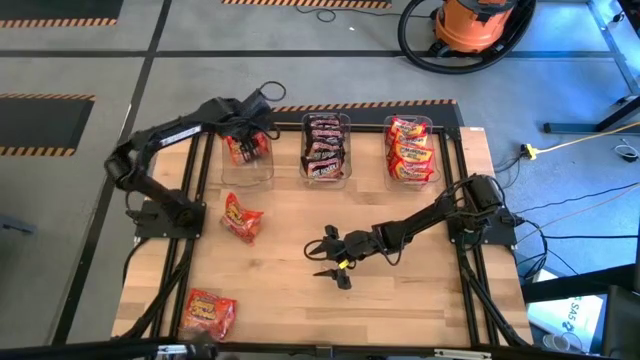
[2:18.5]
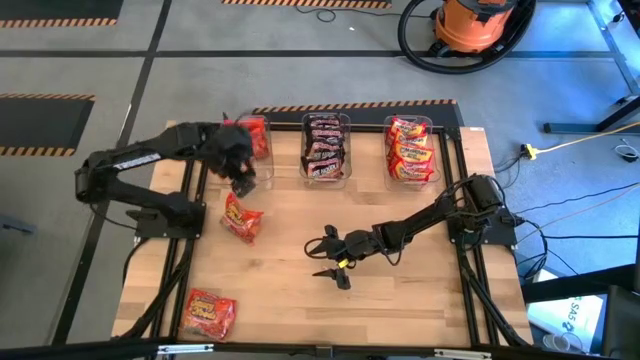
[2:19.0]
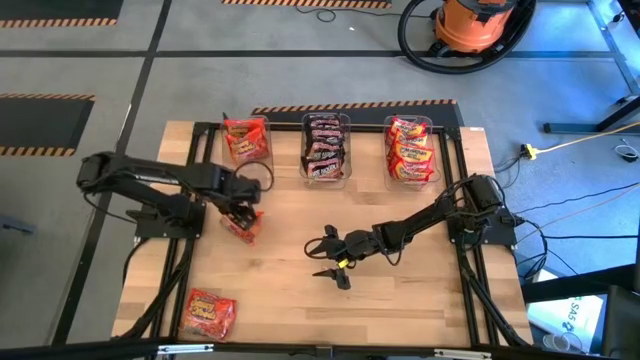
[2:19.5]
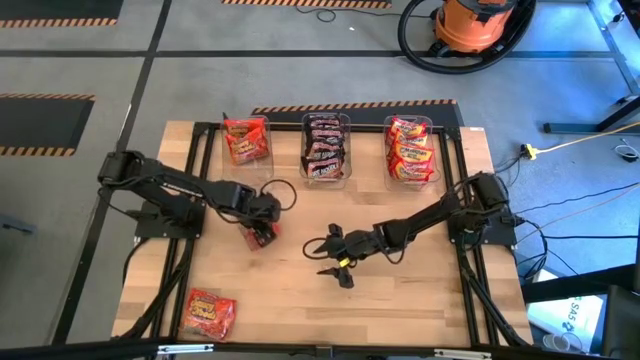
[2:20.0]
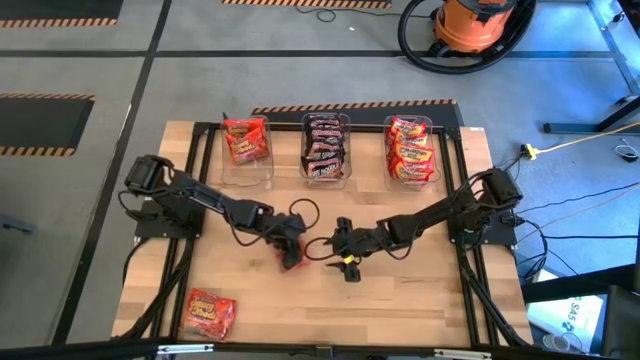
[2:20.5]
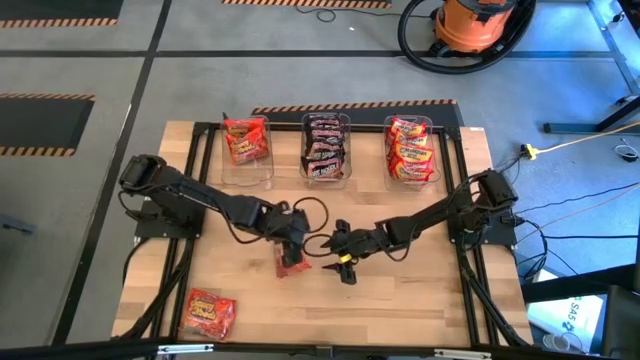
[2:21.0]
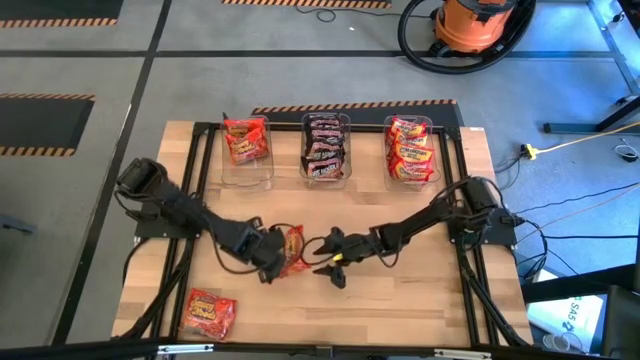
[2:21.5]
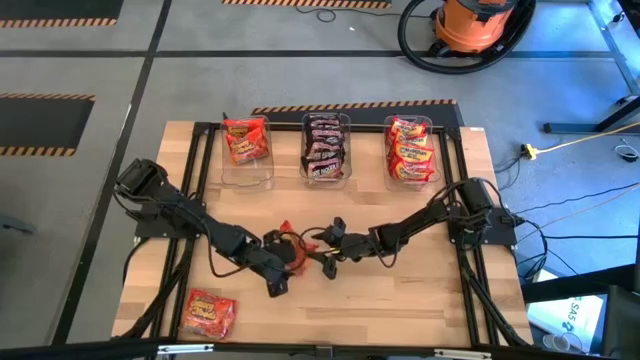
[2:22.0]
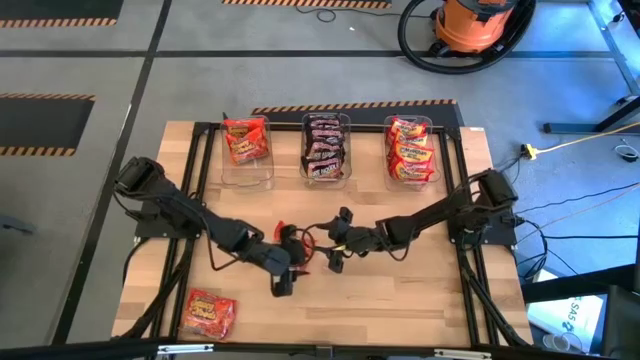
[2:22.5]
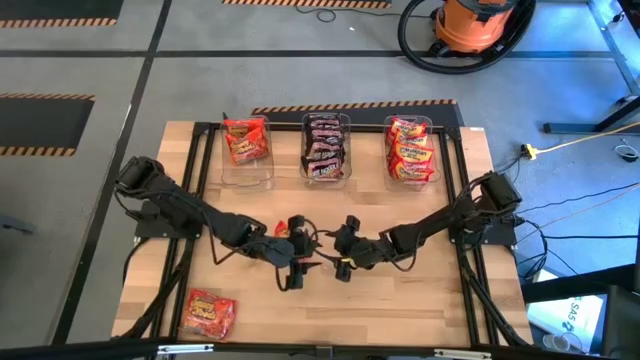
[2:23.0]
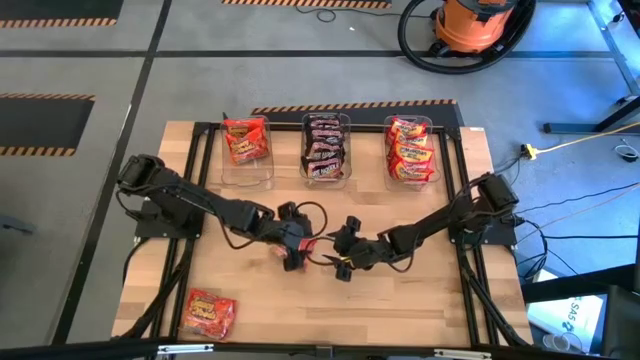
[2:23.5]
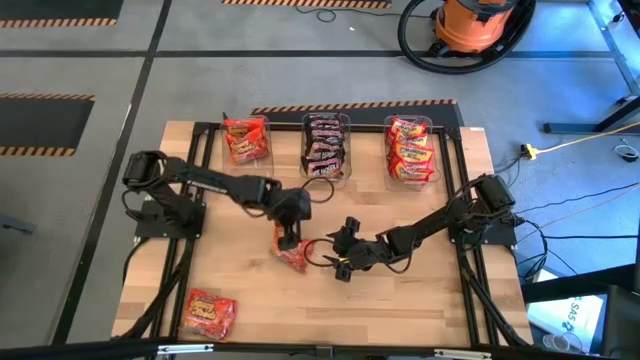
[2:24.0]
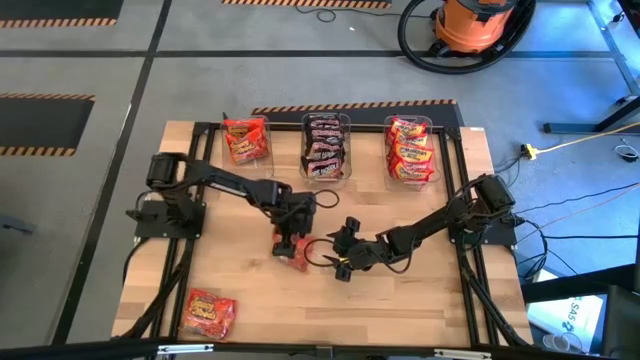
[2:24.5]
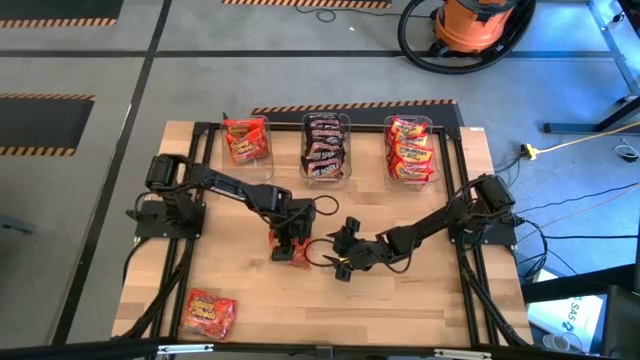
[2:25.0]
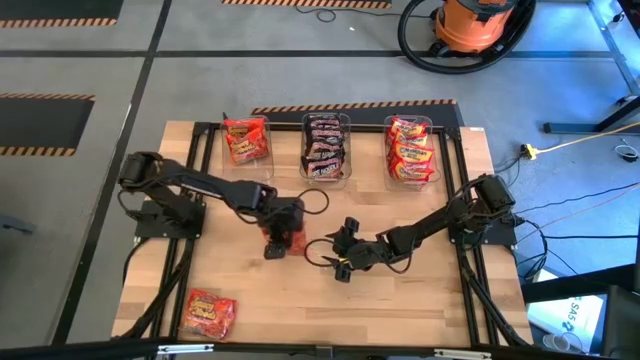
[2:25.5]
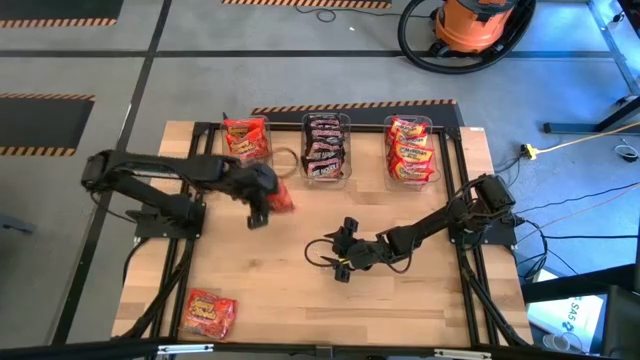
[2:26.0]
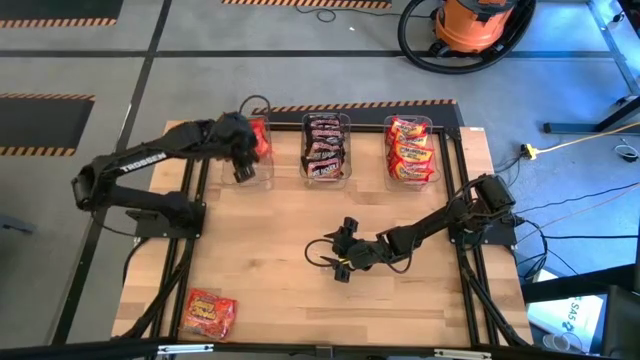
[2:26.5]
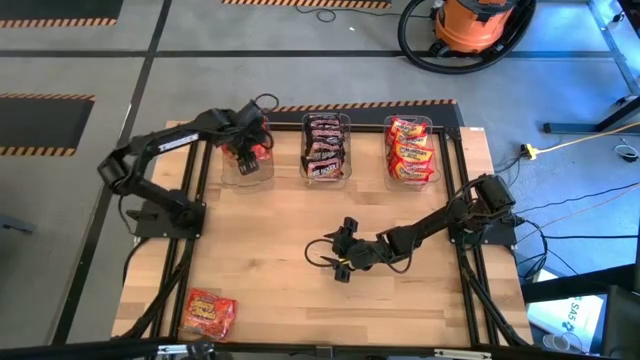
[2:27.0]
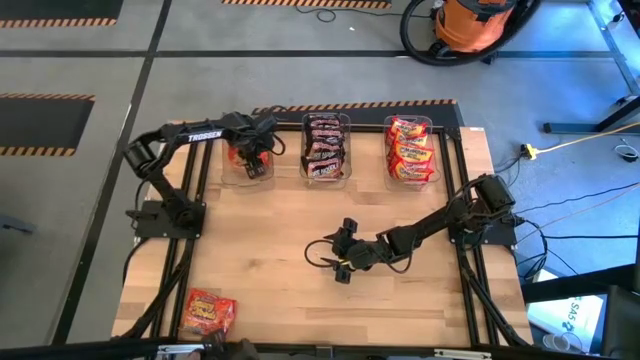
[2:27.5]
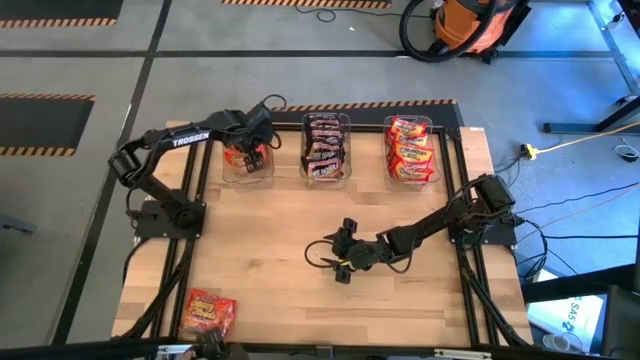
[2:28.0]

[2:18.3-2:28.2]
Task: Sort Maruchan noodles
Put the top orange noodle pack into the left transparent bin

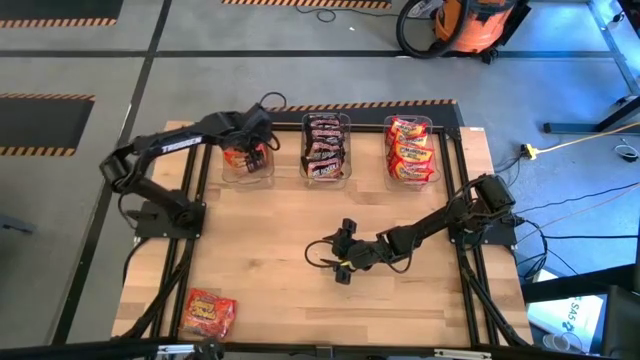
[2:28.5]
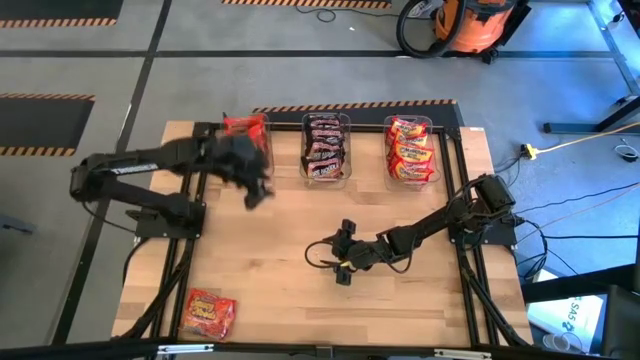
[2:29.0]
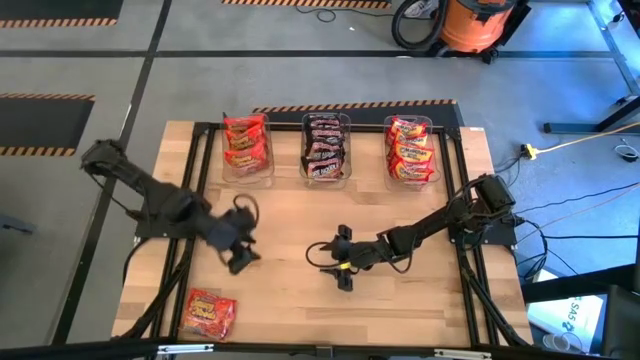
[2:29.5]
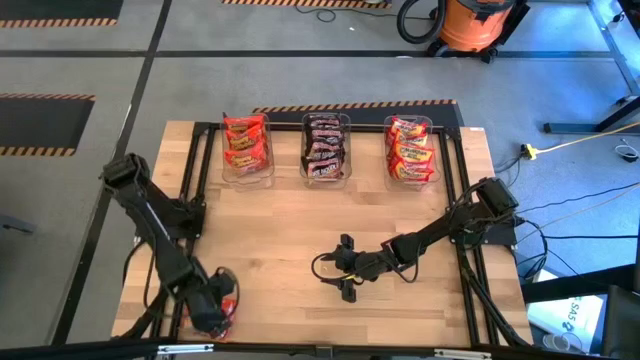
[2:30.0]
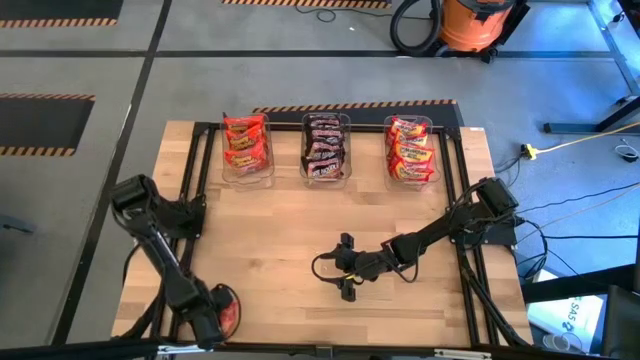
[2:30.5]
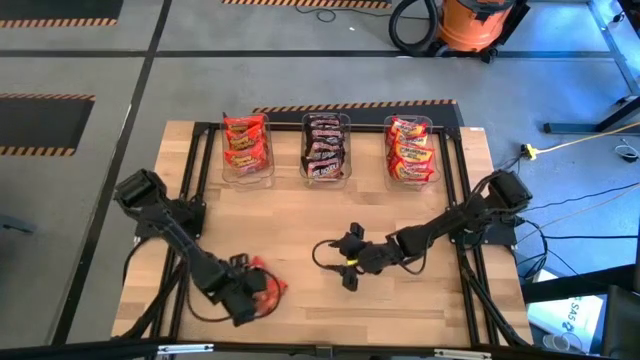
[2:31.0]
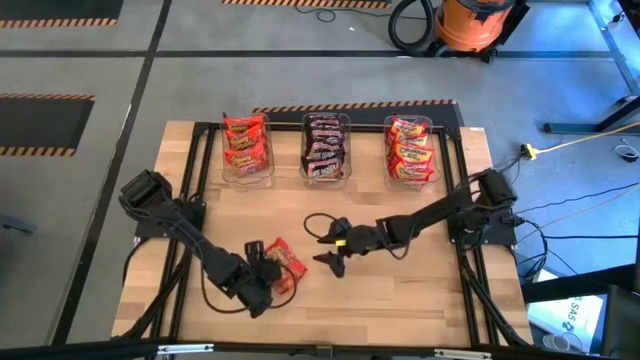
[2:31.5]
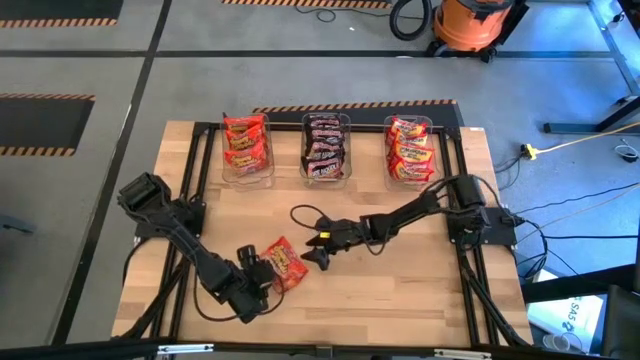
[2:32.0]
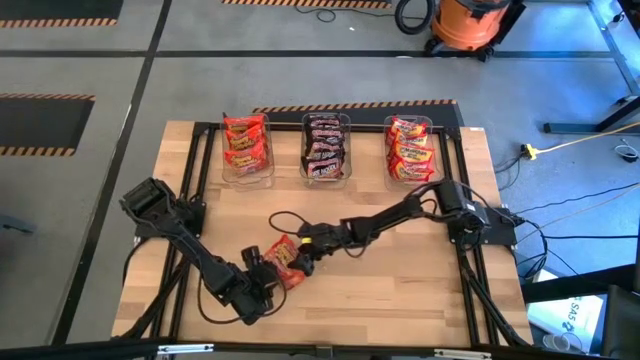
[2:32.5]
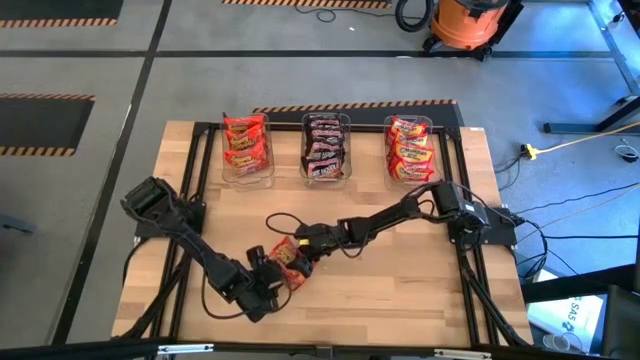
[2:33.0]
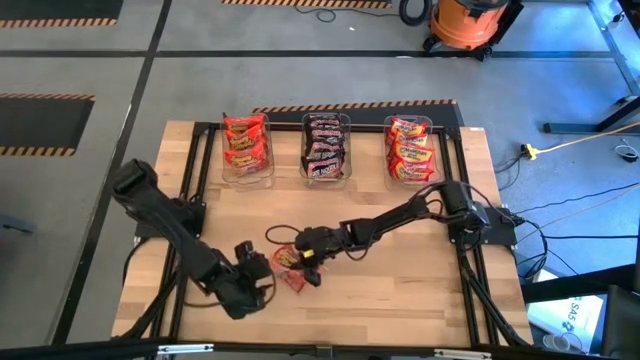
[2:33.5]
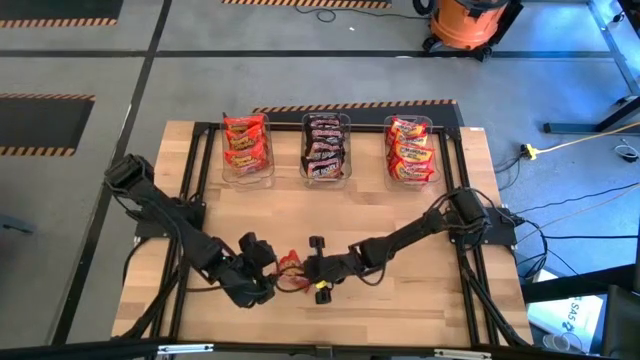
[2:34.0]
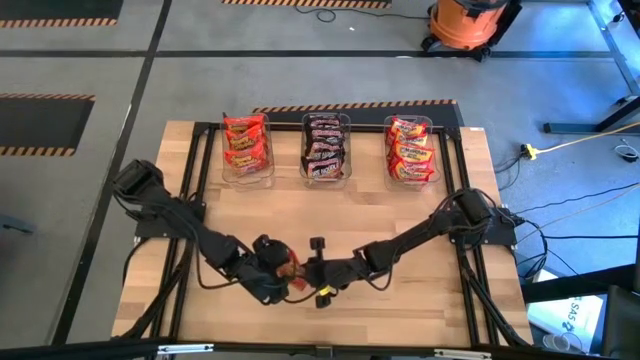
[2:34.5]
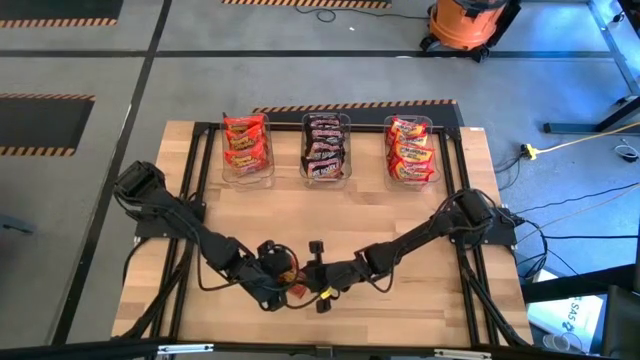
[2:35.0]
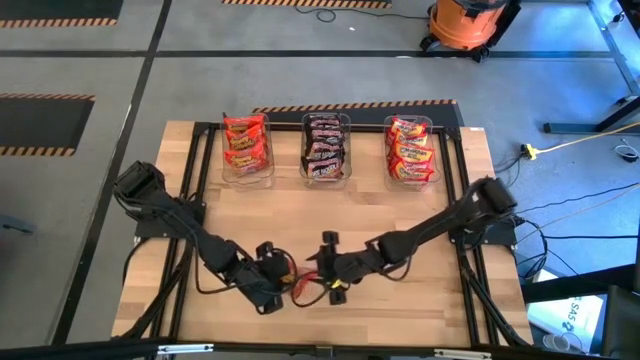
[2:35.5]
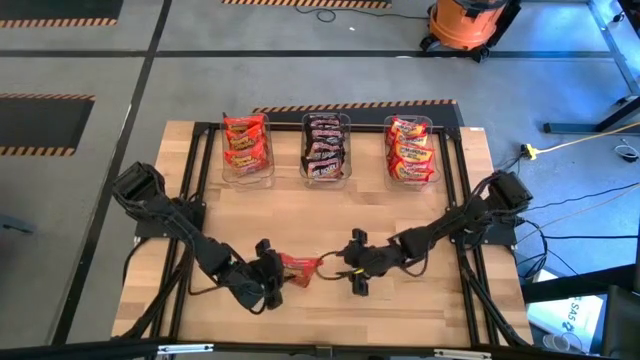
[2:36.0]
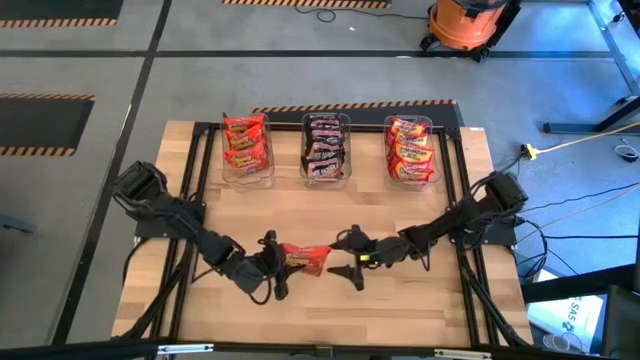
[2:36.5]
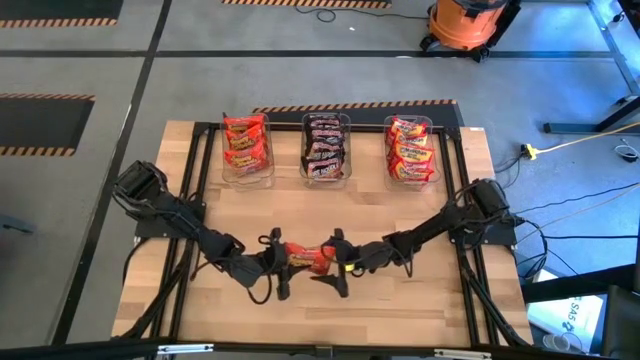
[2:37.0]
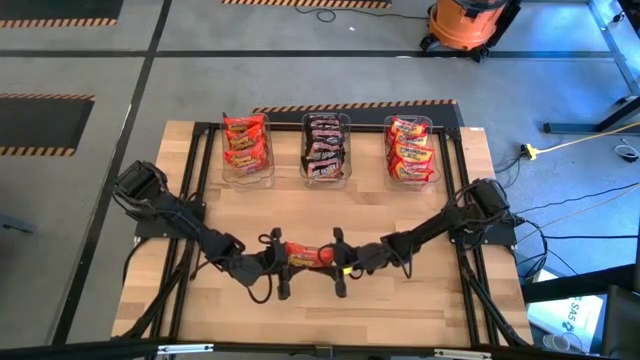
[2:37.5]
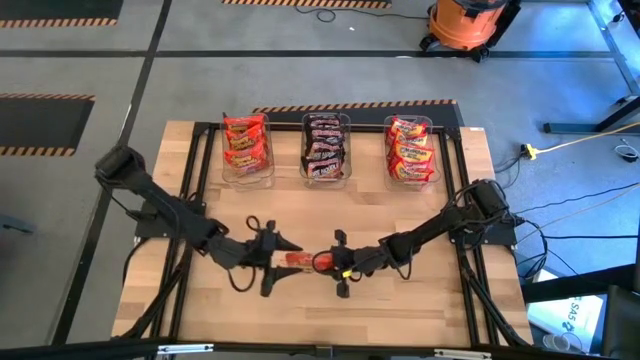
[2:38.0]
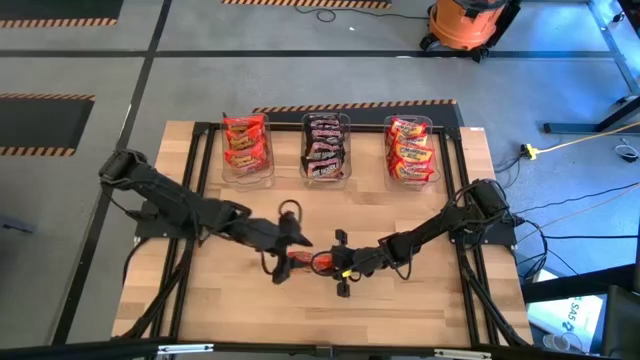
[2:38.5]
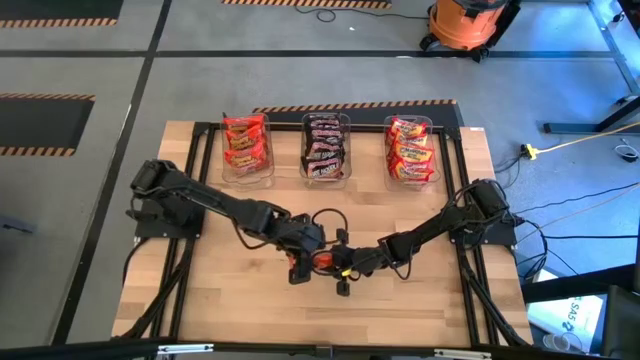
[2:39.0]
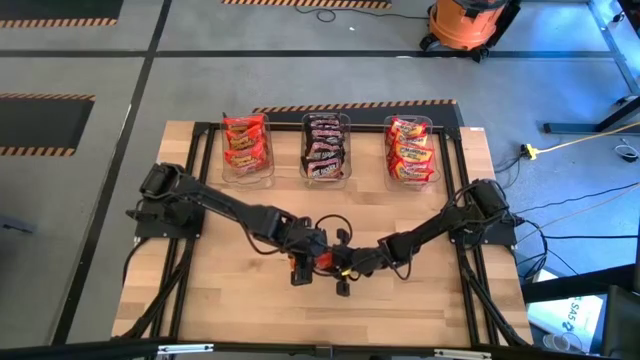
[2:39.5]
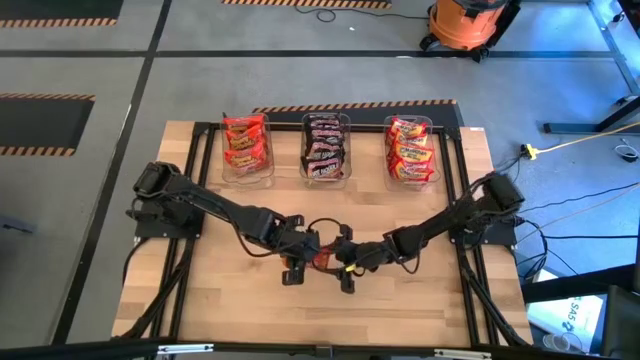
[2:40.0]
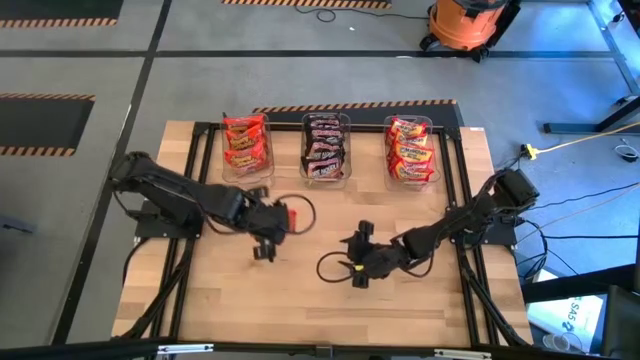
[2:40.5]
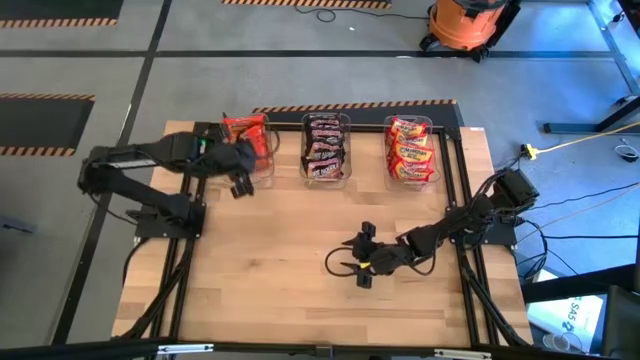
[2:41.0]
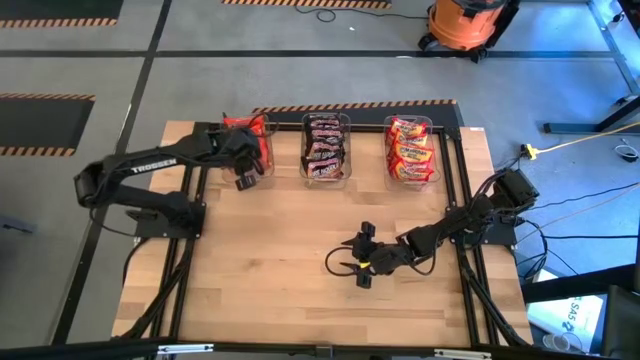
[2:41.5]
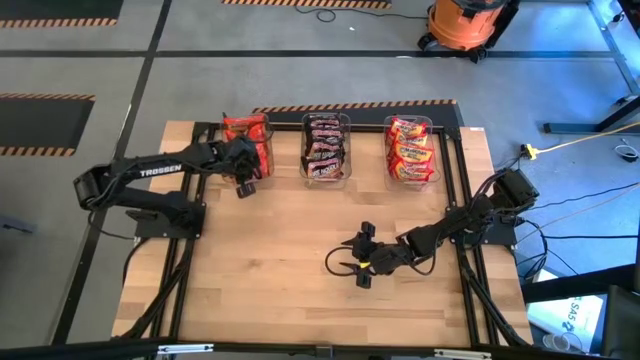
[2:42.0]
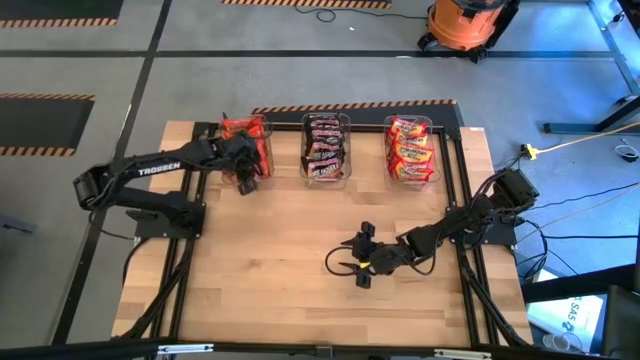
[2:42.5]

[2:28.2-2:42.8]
Put the orange noodle pack into the left transparent bin
